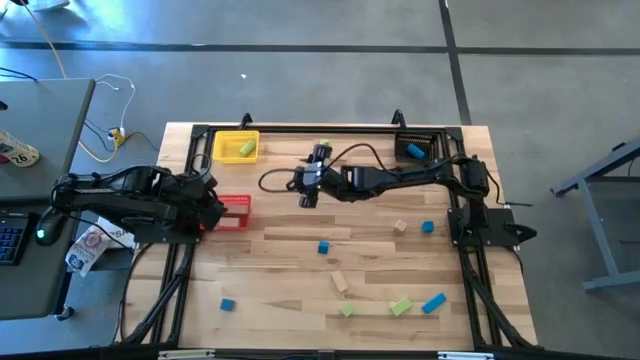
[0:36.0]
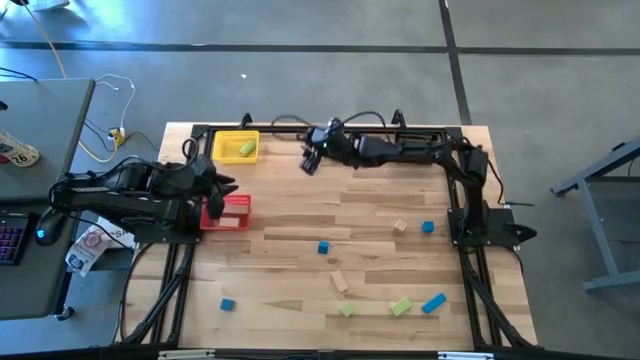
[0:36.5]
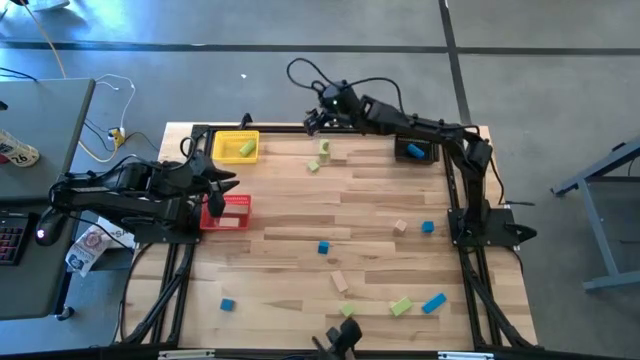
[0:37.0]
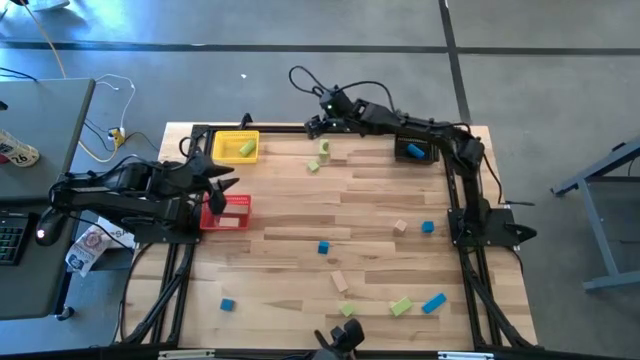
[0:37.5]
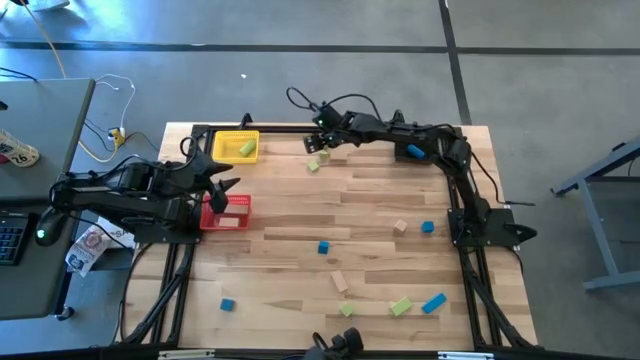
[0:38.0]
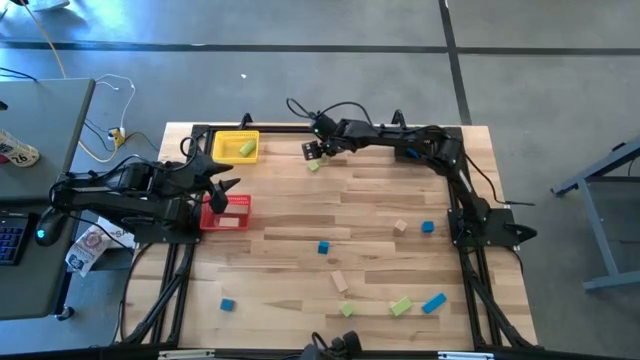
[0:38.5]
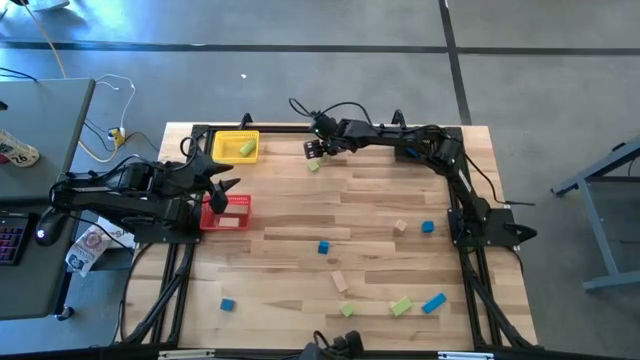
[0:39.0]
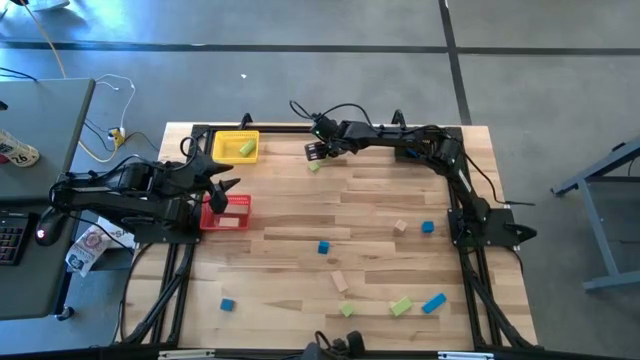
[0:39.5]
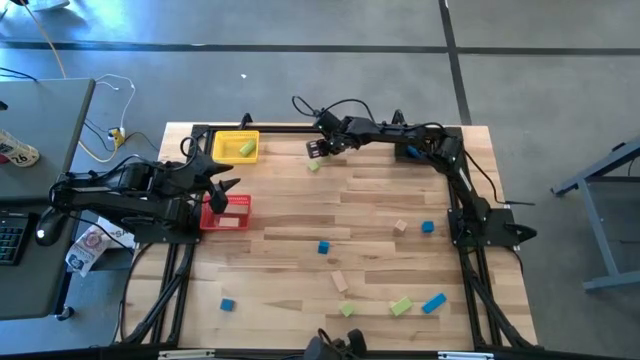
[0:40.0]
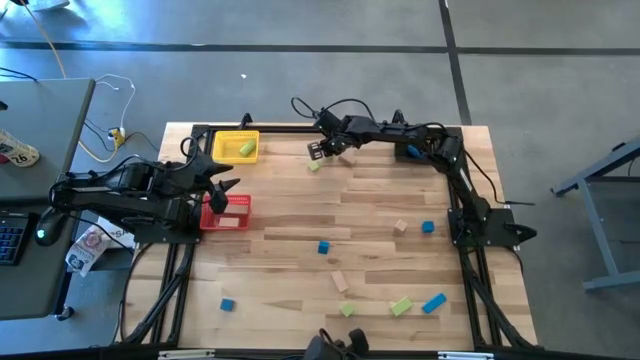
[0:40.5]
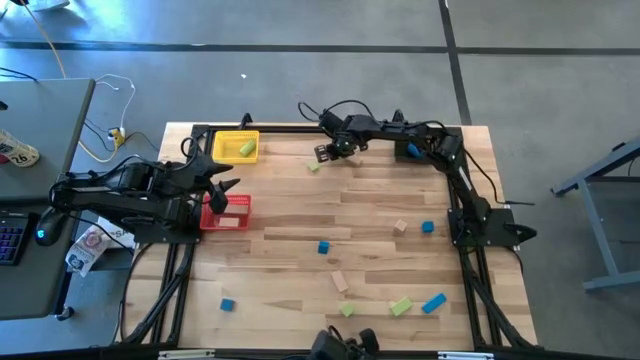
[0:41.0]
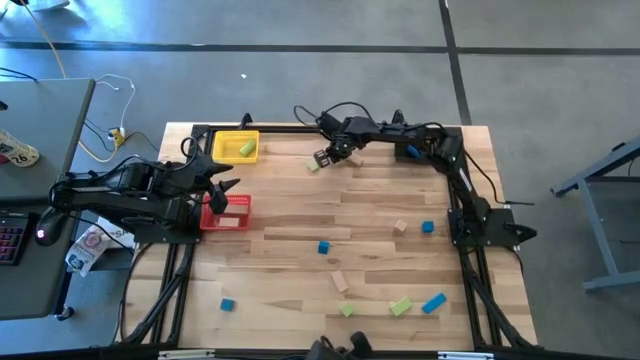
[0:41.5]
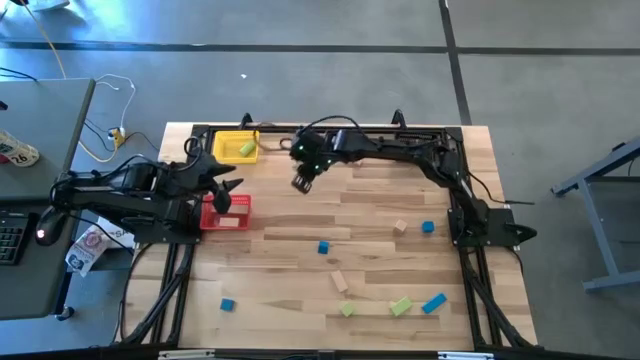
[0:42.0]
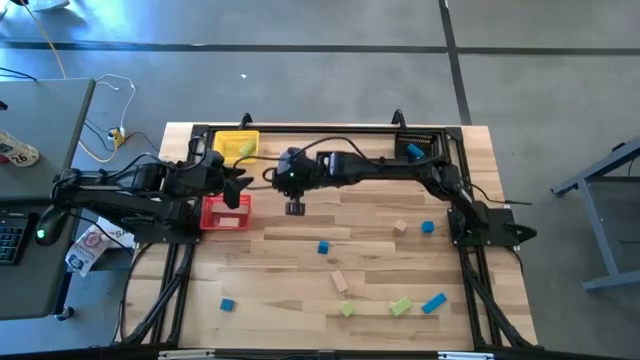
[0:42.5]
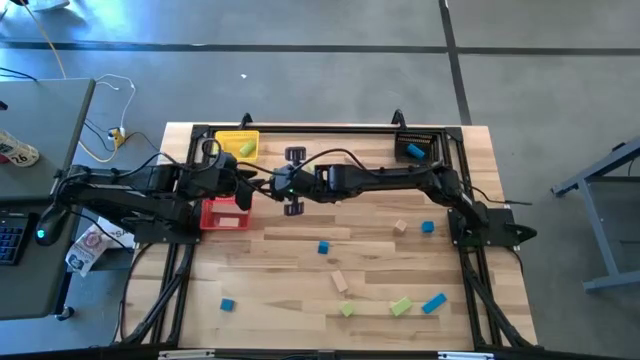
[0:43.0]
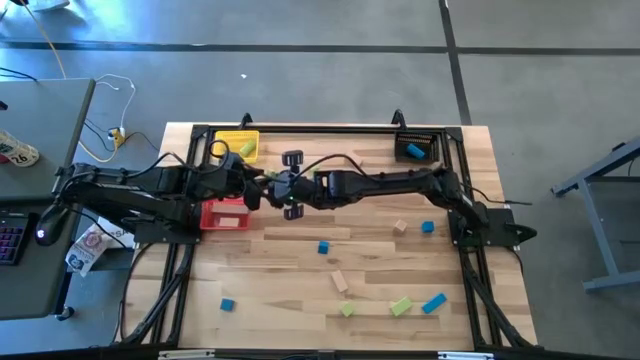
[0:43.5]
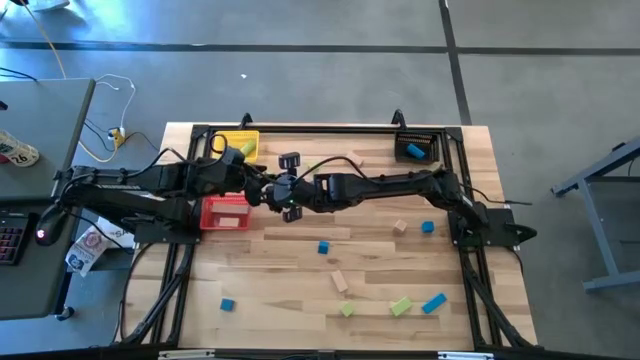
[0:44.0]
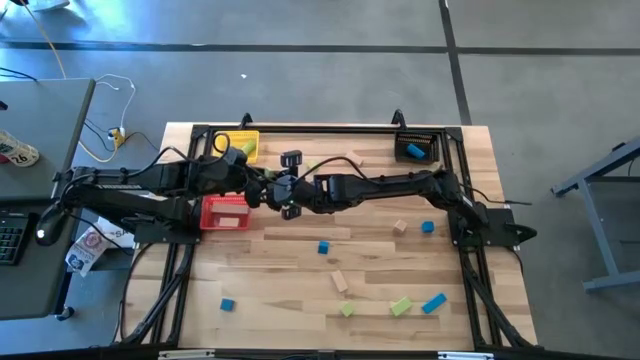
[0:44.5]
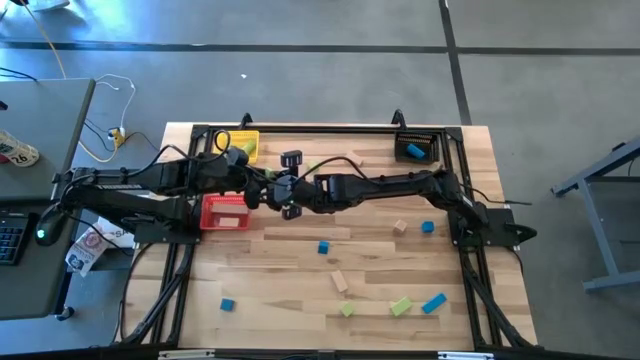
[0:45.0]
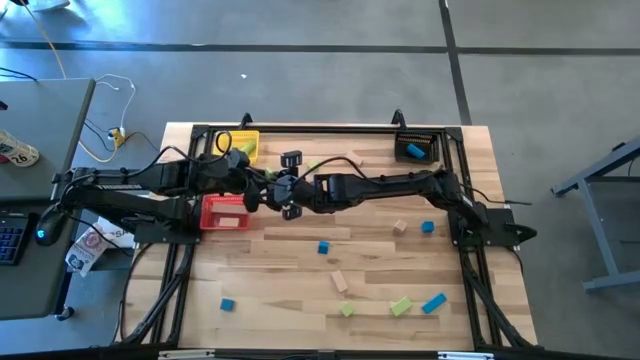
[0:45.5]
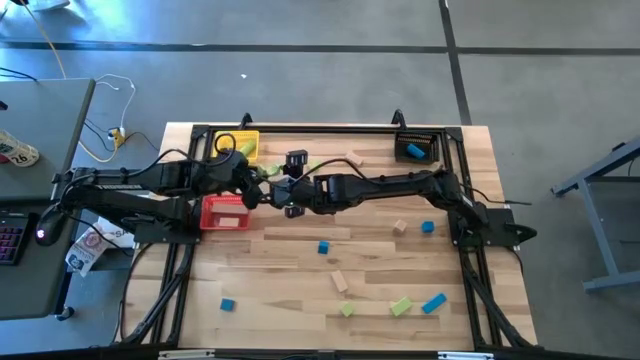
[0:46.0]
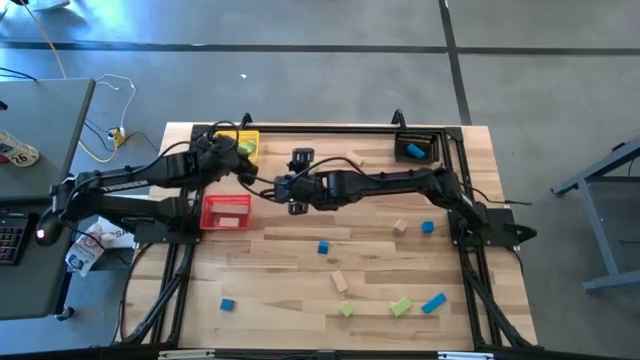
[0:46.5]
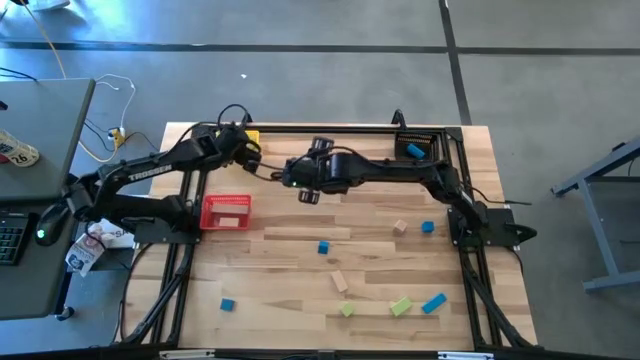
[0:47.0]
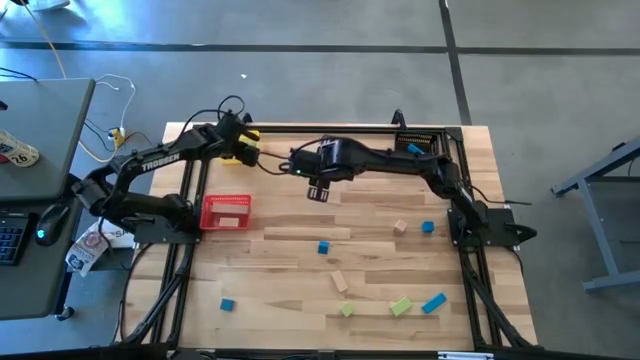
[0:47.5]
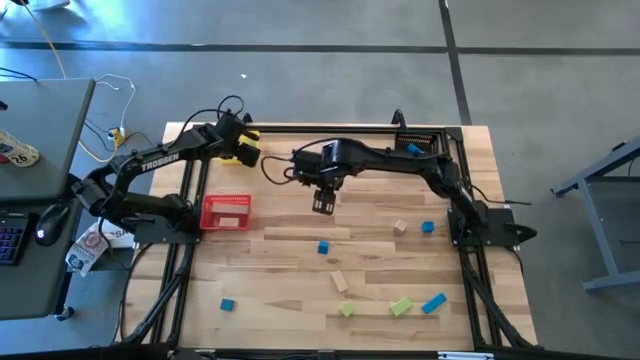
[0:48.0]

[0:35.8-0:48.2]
Task: Sort & place blocks by color
Put the green block into the yellow bin

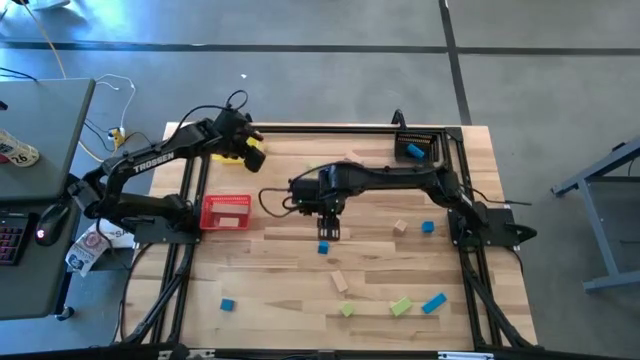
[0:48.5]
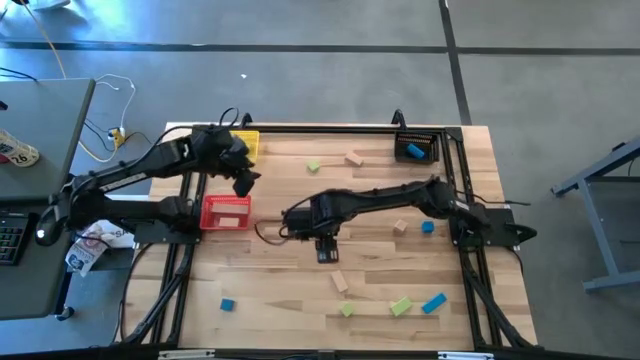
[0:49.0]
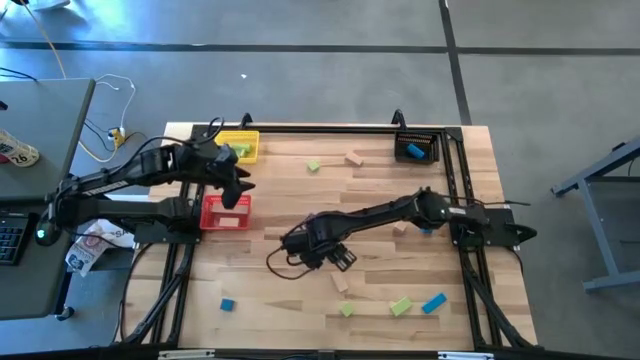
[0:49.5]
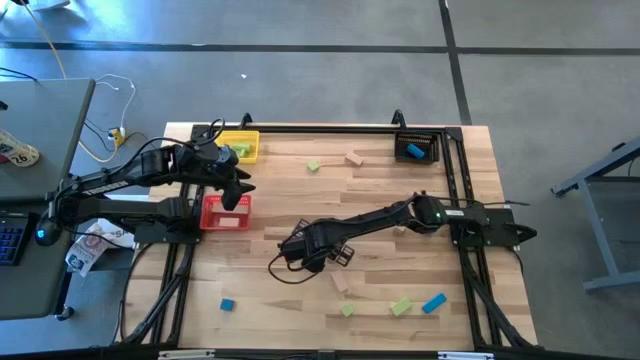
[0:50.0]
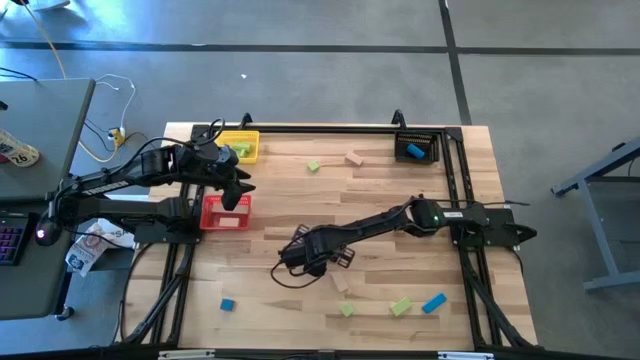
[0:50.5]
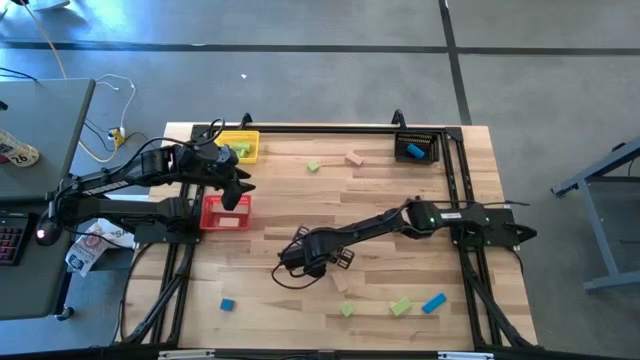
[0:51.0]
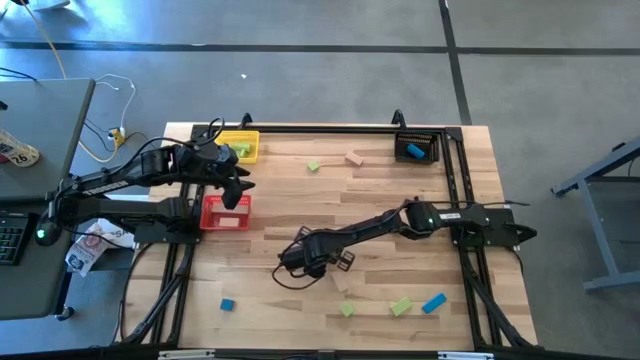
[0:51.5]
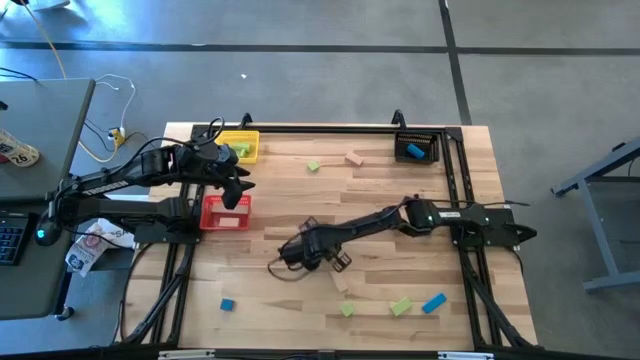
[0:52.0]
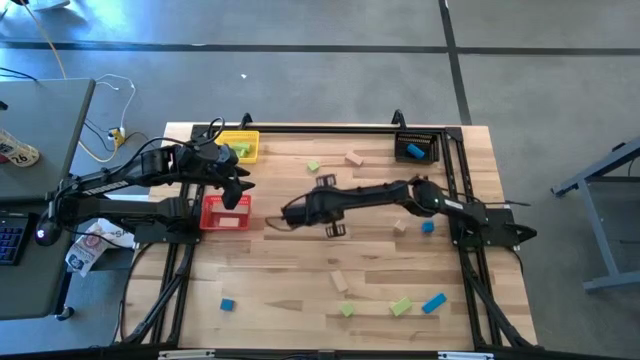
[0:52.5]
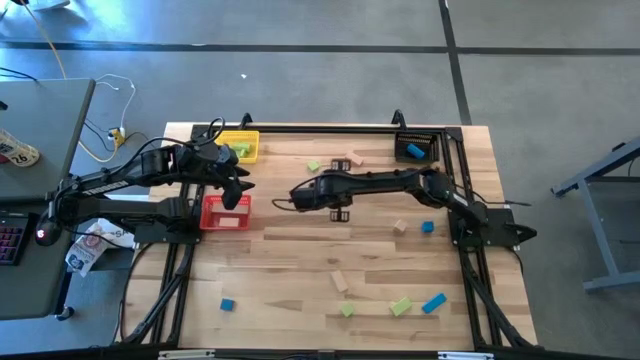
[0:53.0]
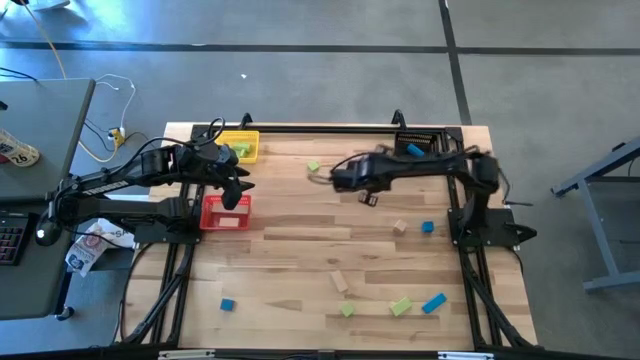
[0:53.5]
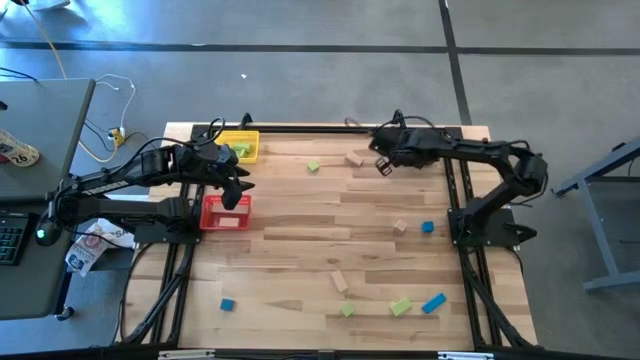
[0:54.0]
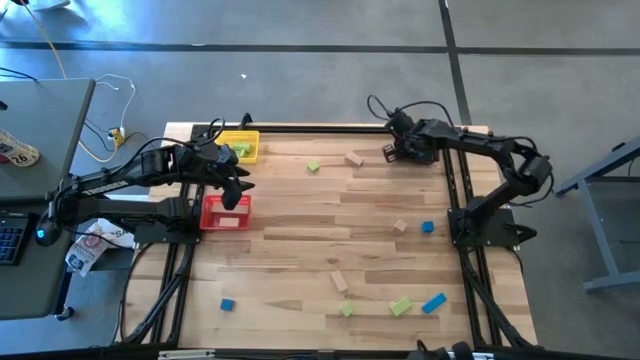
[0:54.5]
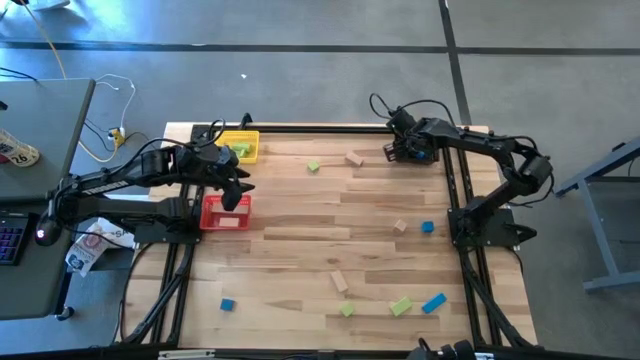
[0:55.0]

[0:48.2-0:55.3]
Put the blue block into the black bin
